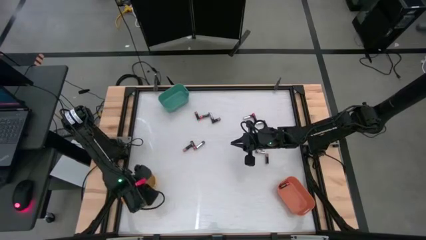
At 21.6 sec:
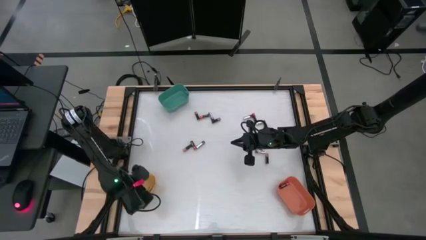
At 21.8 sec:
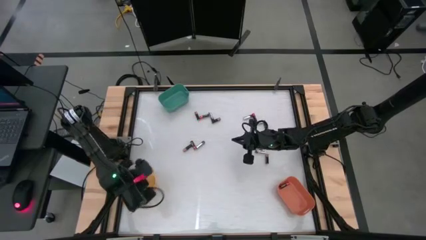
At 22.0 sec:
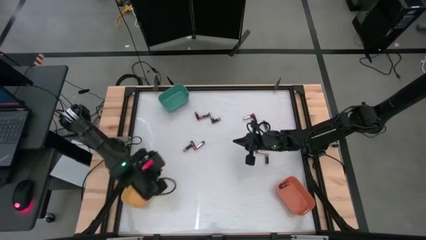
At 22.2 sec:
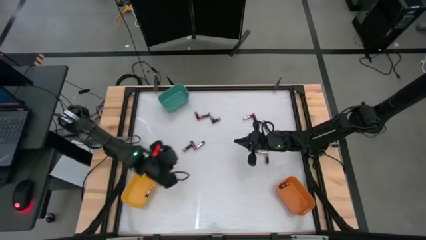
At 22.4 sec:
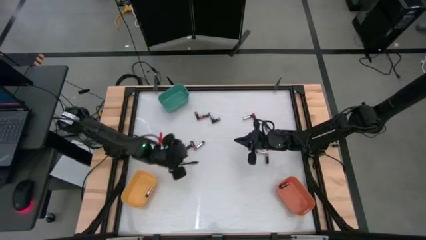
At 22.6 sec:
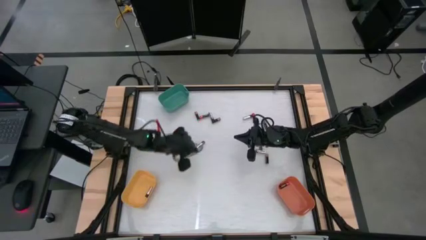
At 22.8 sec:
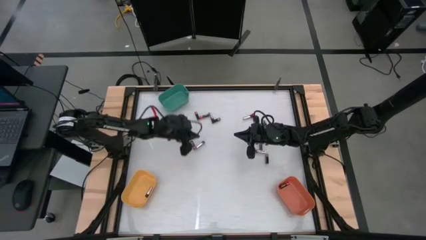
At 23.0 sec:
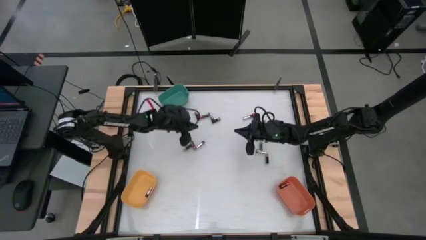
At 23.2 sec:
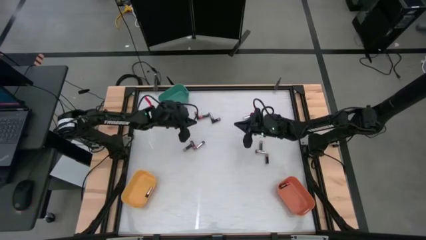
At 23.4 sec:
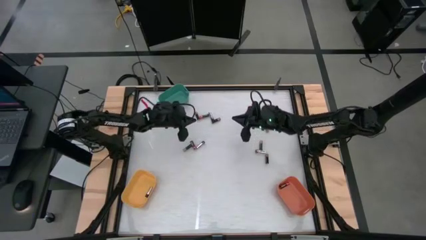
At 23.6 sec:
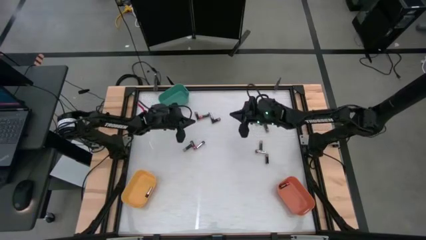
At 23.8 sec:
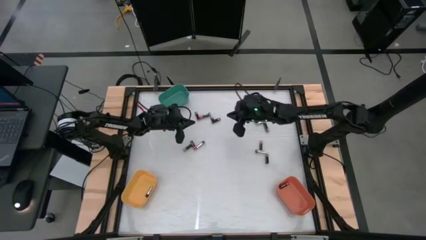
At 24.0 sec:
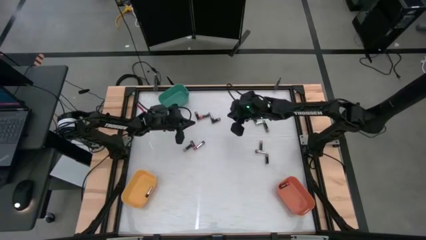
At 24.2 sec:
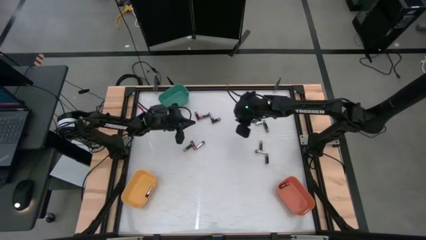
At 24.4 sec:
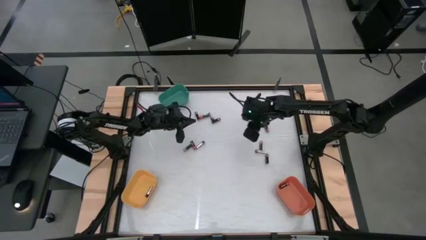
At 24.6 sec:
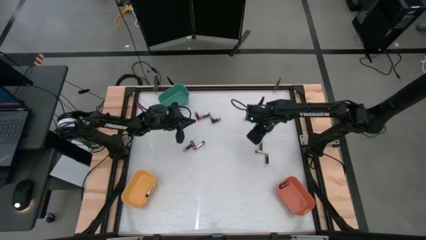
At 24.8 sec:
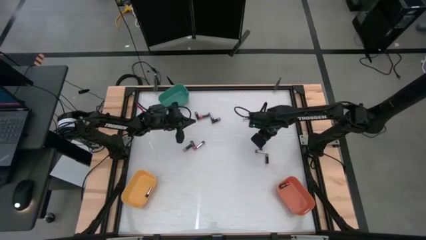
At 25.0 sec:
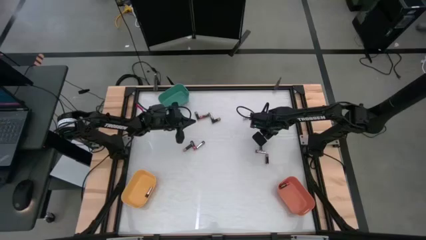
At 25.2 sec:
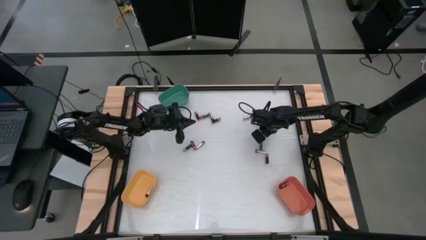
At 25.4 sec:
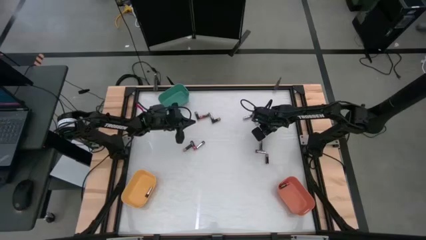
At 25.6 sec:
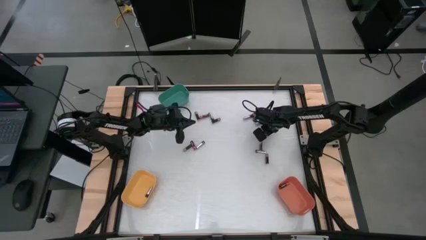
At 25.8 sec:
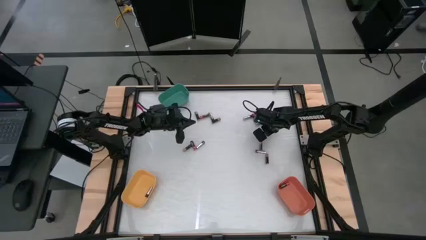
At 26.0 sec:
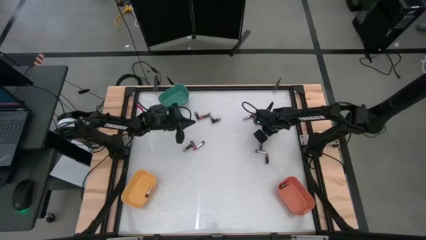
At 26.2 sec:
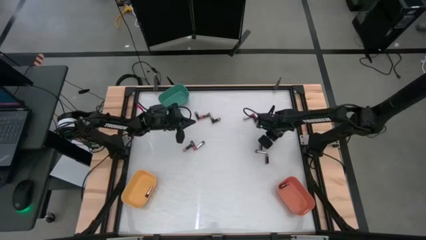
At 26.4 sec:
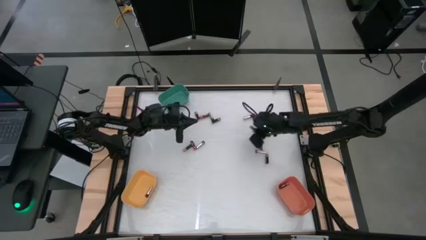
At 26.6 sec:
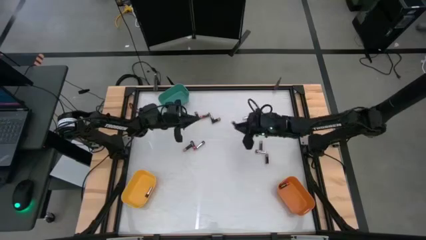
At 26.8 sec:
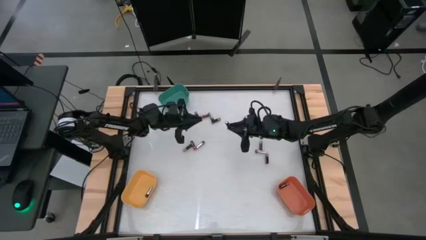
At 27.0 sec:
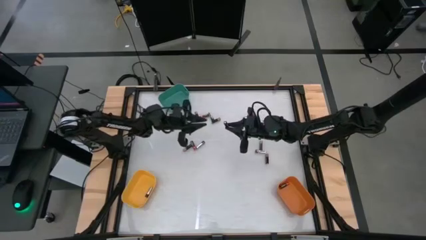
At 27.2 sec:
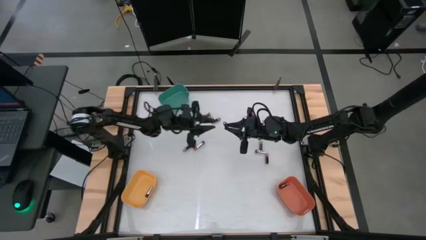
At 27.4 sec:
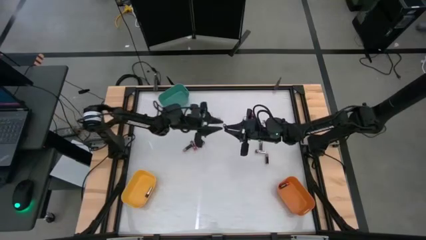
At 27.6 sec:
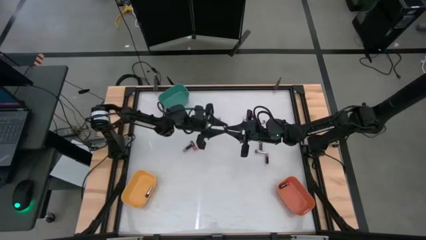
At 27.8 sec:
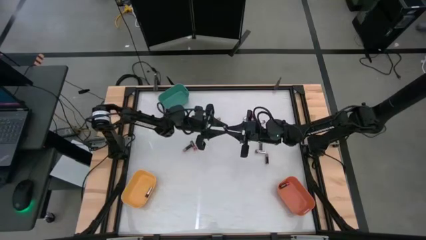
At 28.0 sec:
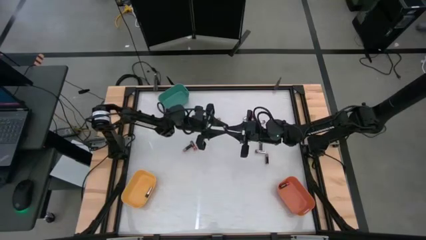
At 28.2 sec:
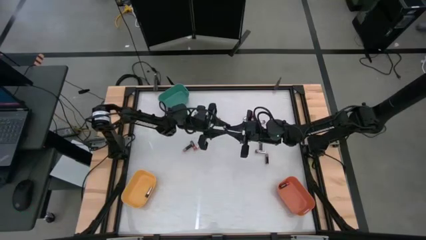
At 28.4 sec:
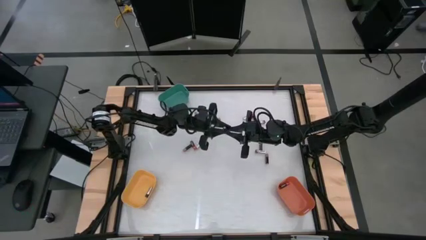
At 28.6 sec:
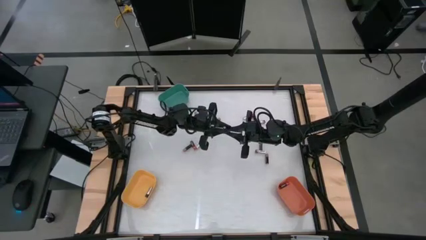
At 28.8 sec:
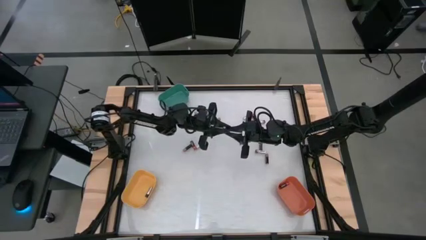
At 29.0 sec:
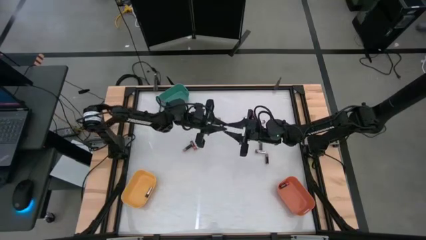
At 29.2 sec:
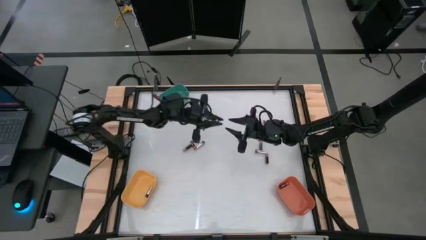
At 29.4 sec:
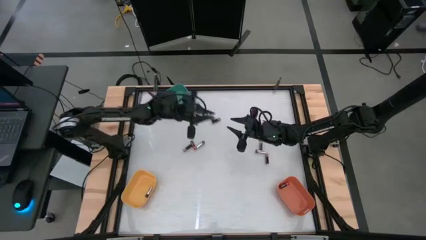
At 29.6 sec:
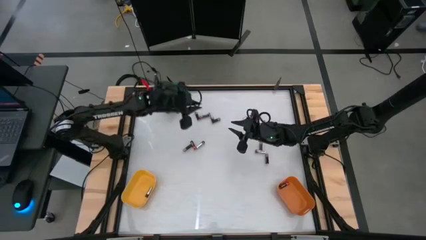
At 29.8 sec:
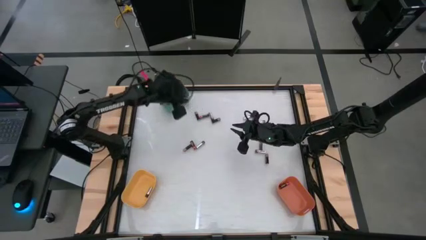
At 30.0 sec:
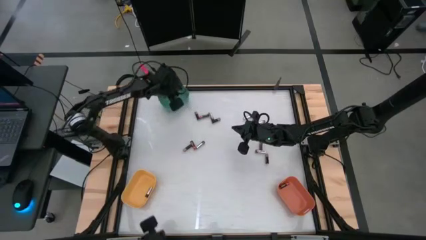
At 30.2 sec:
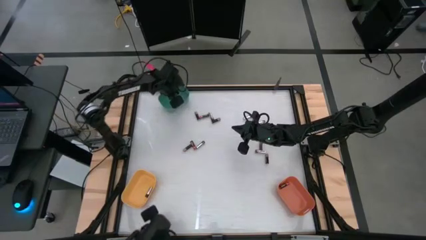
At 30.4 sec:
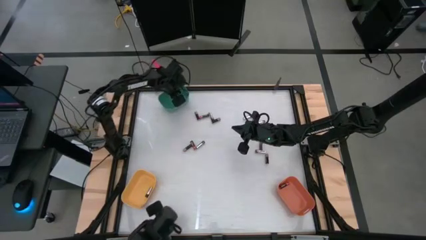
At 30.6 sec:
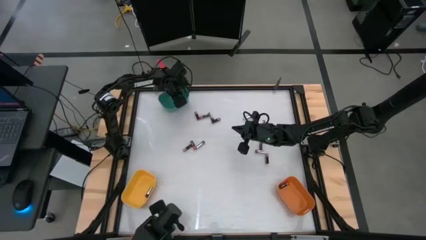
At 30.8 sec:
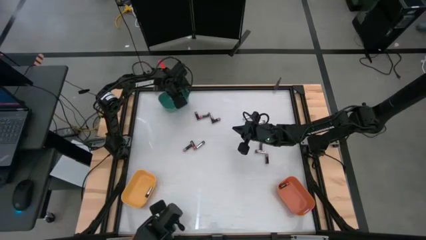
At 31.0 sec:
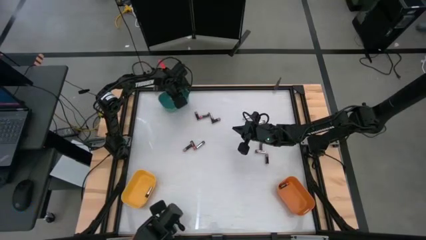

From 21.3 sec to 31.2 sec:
Task: Sort batteries
Put the brown battery into the green bin

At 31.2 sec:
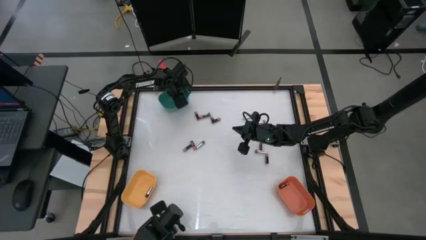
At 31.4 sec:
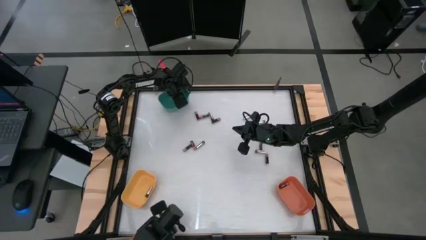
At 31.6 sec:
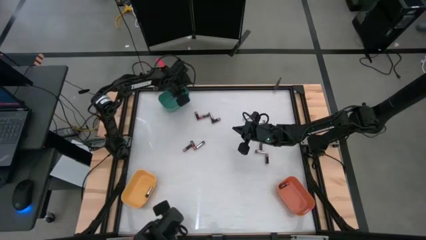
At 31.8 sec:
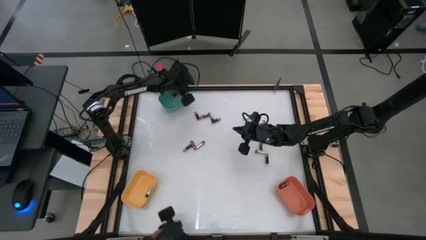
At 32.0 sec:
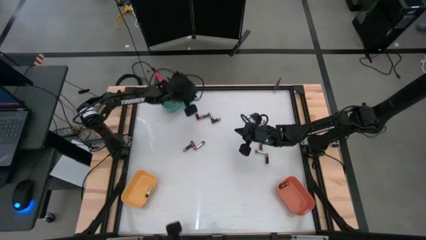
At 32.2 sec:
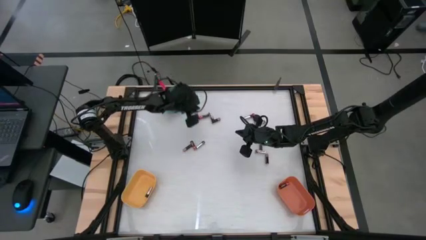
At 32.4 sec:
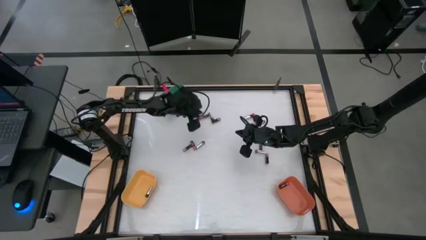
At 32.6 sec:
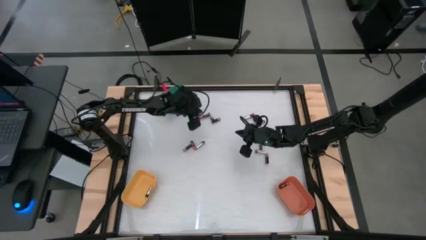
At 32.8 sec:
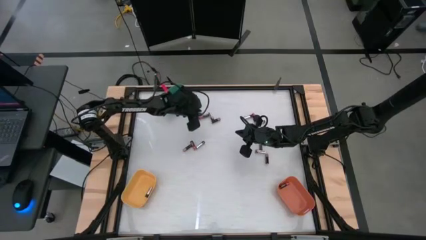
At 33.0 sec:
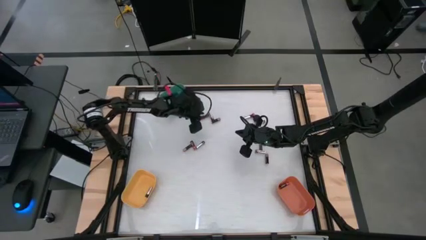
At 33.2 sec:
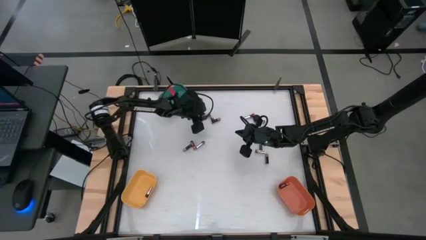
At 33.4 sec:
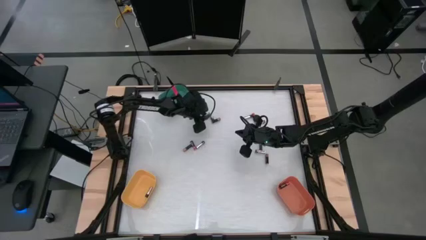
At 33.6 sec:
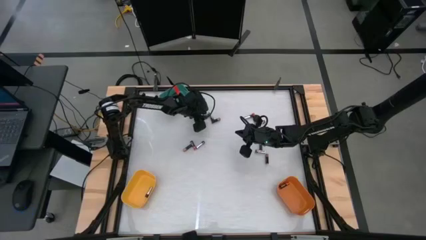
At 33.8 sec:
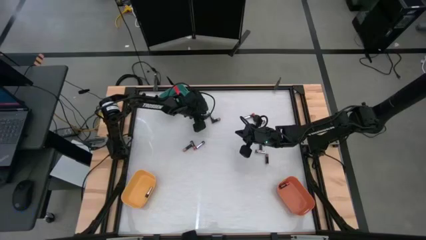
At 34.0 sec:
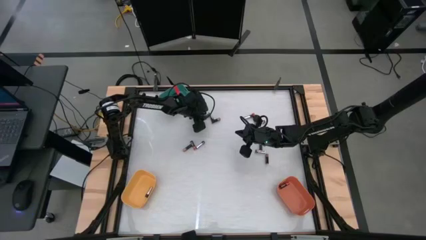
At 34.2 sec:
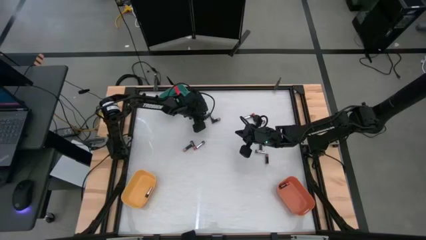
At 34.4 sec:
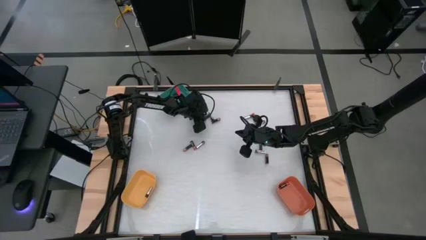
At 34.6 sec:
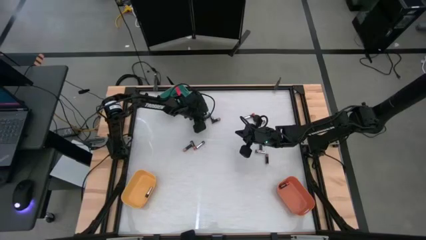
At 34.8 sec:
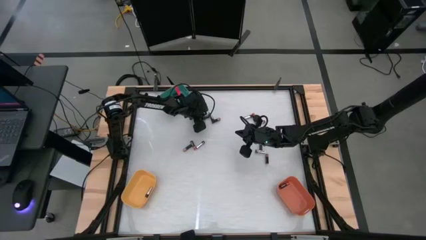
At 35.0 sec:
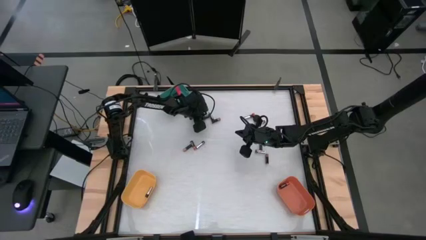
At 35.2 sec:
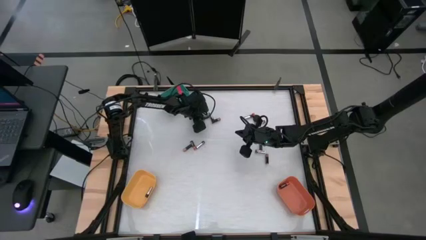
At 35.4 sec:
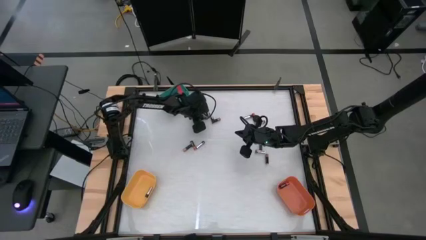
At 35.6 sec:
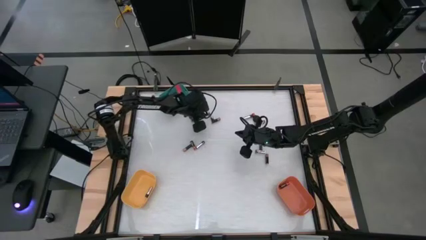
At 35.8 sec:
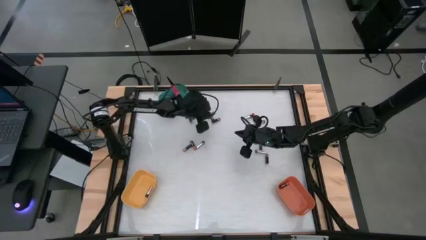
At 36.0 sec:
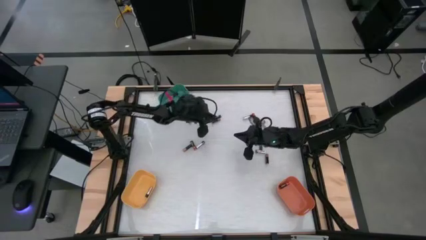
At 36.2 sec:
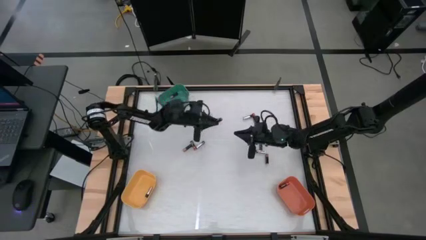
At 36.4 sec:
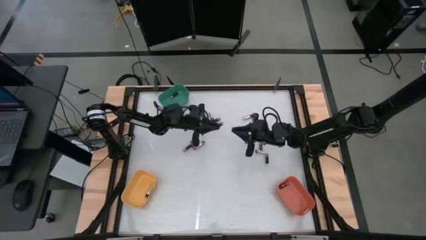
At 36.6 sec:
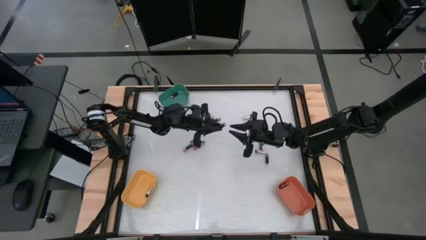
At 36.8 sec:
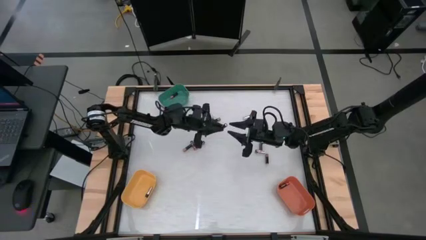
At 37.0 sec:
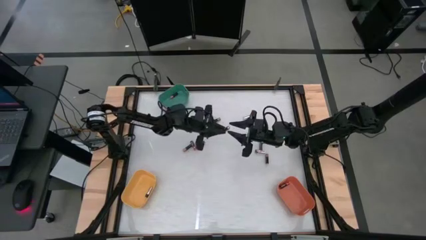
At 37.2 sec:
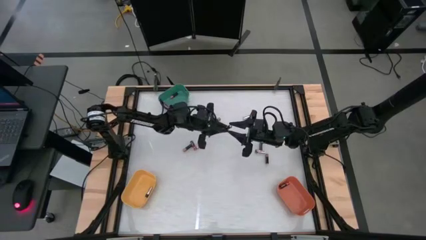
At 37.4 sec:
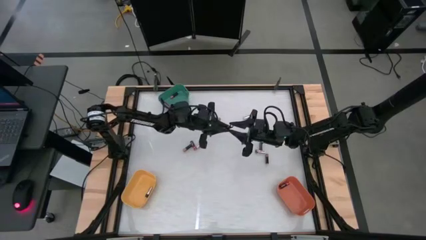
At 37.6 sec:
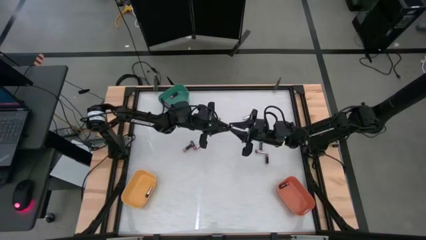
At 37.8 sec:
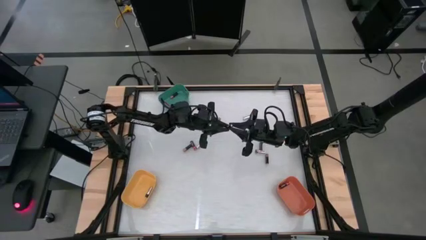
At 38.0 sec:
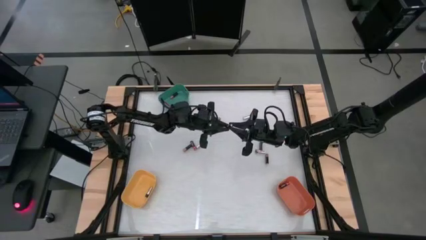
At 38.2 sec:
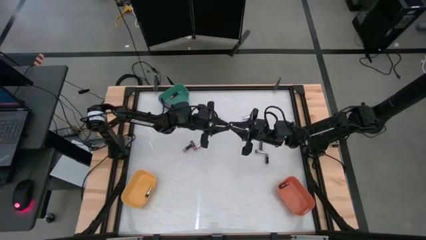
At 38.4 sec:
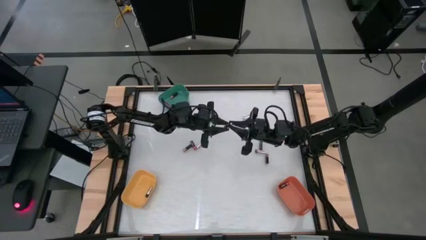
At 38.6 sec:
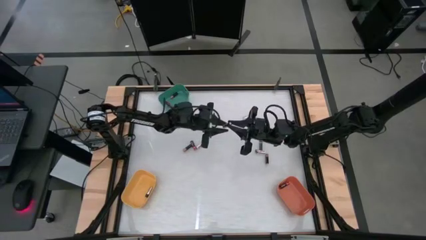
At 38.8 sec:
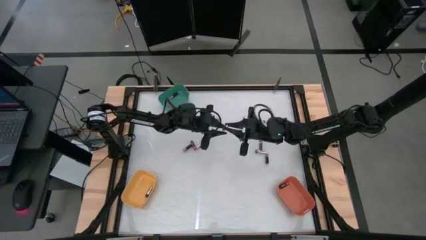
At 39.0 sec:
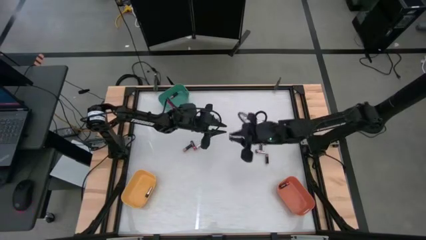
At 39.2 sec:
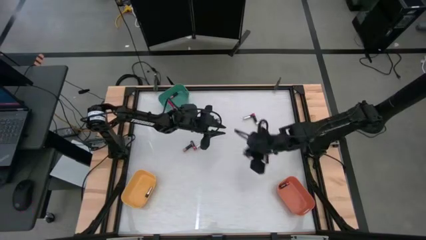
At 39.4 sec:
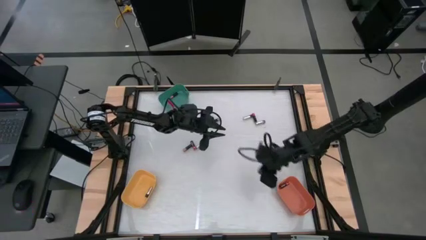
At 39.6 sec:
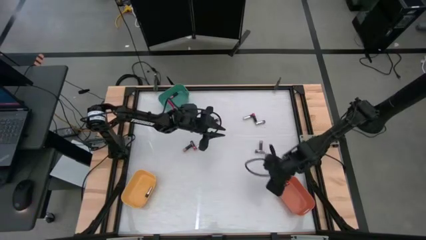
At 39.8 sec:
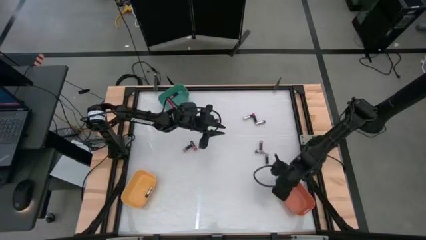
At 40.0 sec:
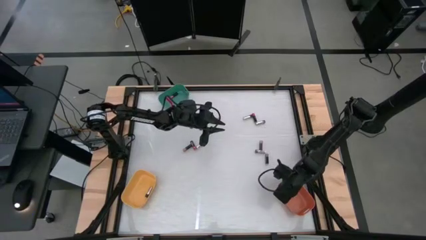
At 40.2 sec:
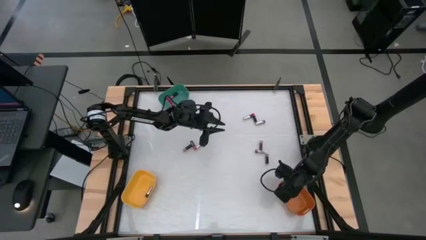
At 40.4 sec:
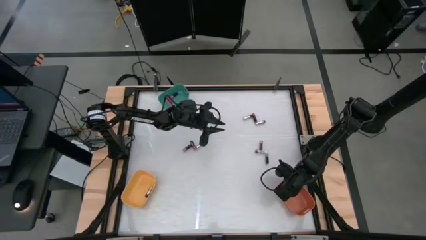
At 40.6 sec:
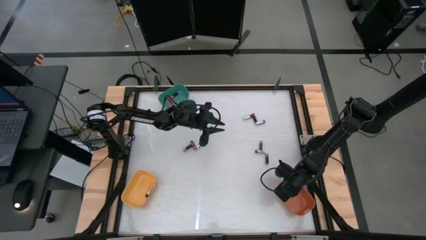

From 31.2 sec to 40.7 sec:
Put the red battery into the orange bin
